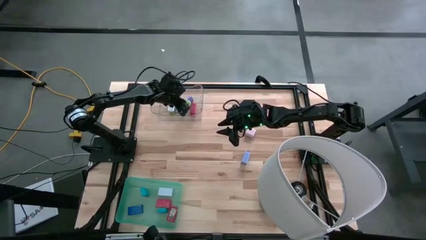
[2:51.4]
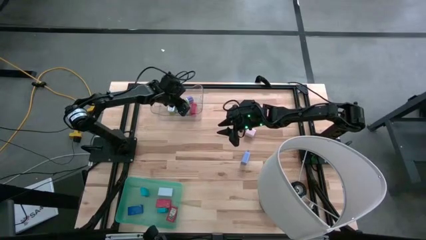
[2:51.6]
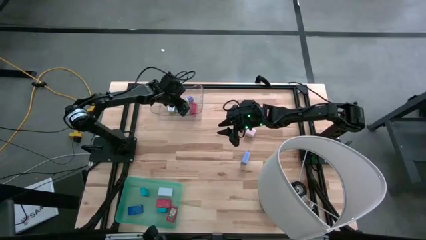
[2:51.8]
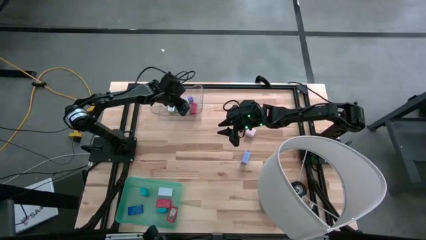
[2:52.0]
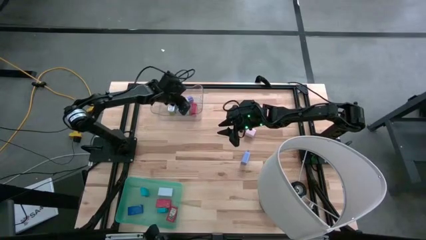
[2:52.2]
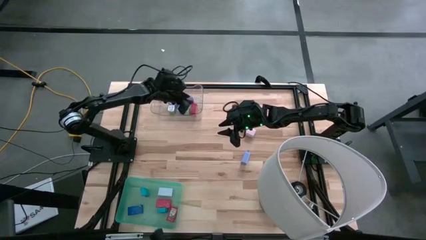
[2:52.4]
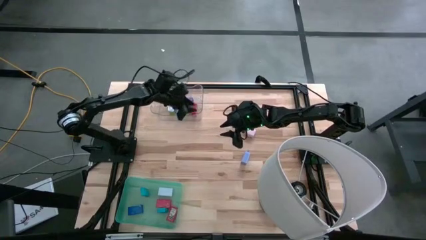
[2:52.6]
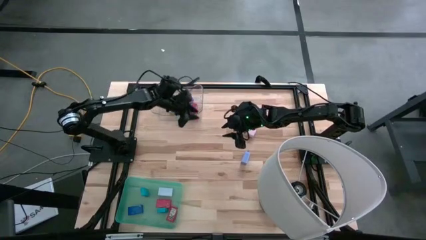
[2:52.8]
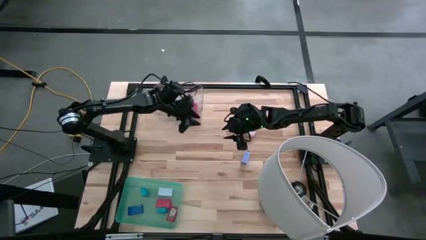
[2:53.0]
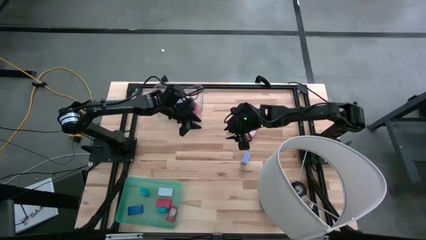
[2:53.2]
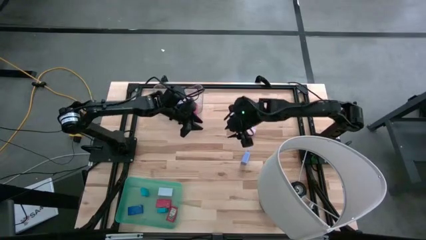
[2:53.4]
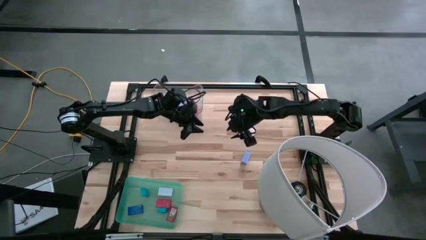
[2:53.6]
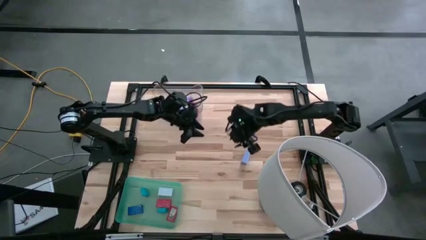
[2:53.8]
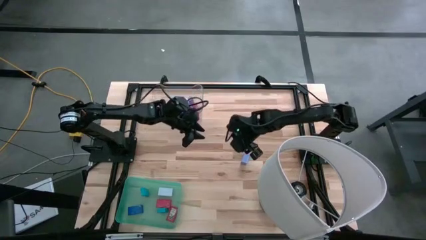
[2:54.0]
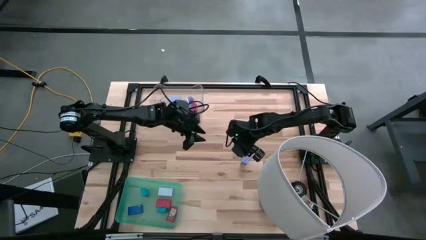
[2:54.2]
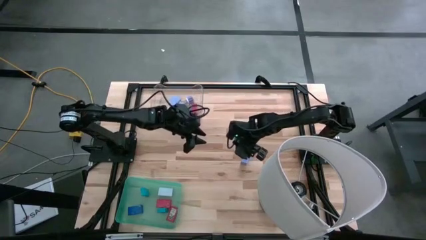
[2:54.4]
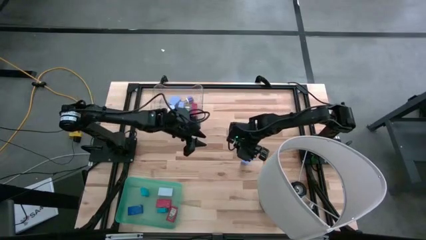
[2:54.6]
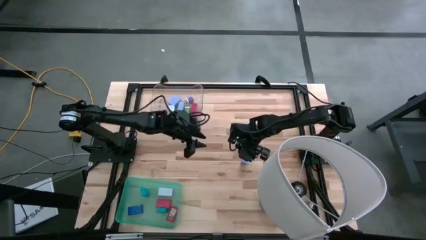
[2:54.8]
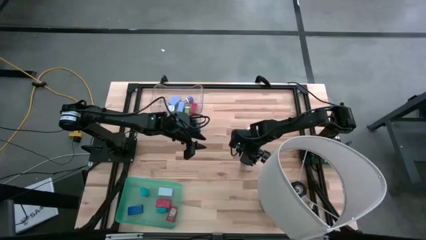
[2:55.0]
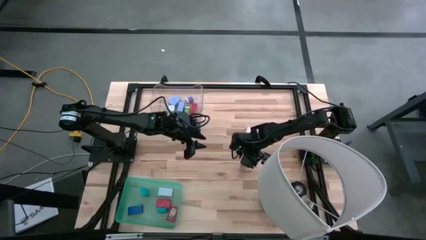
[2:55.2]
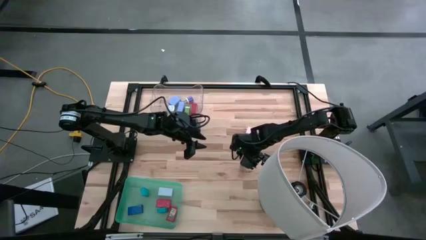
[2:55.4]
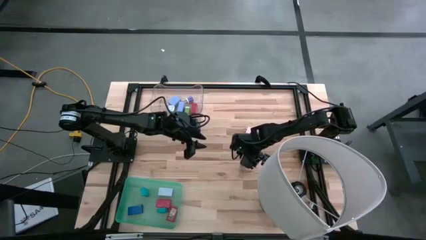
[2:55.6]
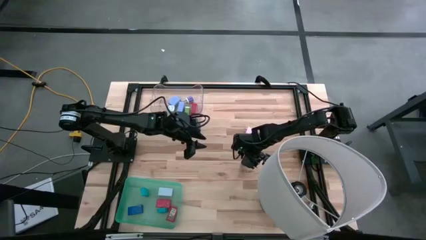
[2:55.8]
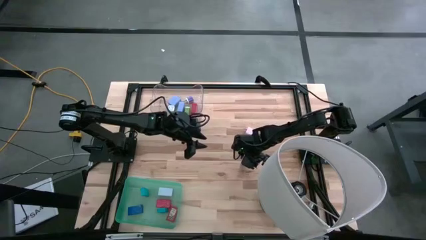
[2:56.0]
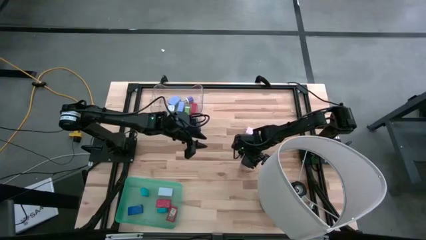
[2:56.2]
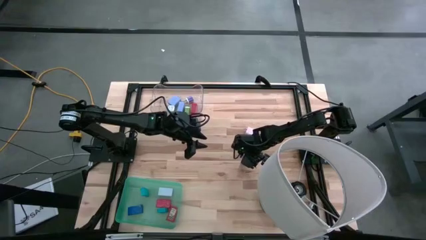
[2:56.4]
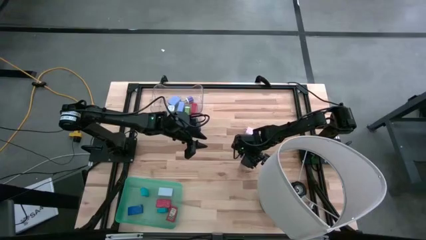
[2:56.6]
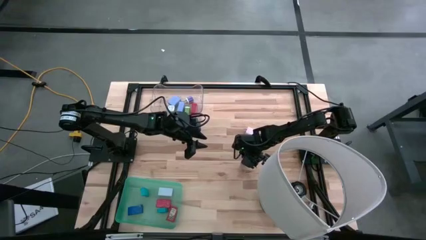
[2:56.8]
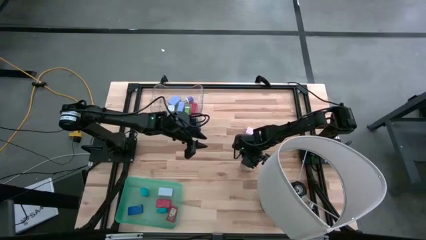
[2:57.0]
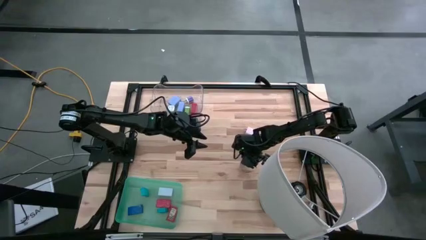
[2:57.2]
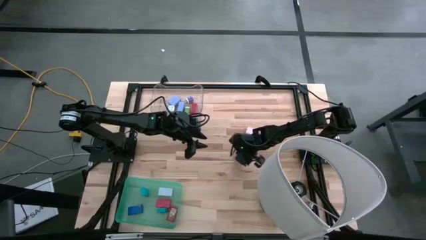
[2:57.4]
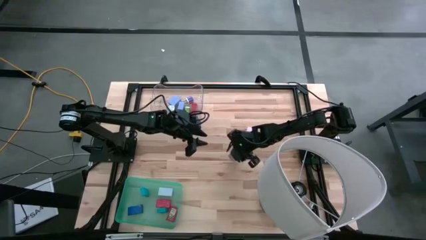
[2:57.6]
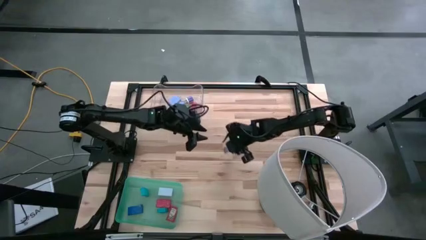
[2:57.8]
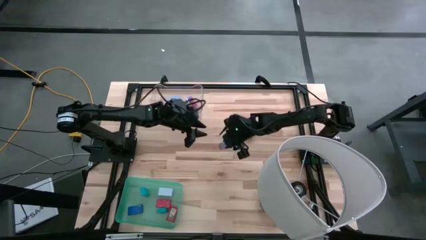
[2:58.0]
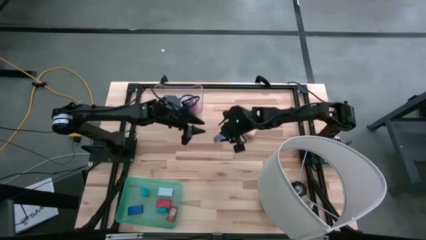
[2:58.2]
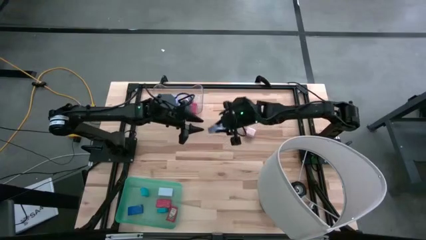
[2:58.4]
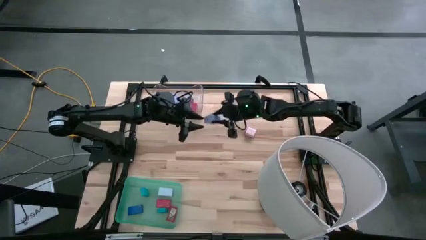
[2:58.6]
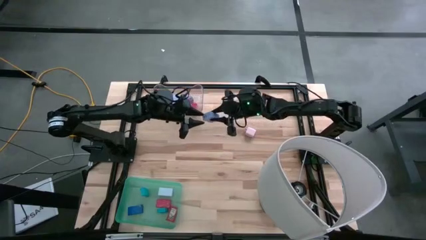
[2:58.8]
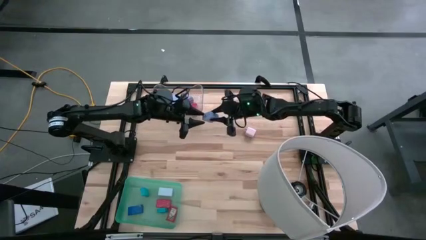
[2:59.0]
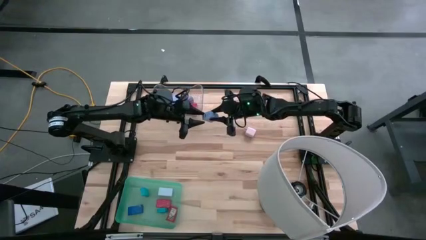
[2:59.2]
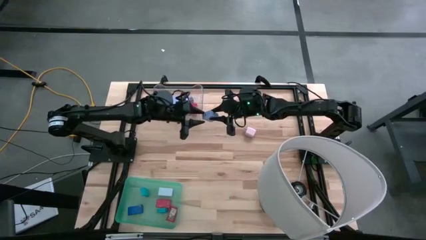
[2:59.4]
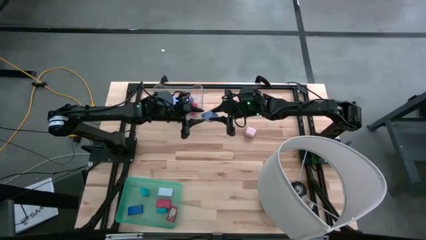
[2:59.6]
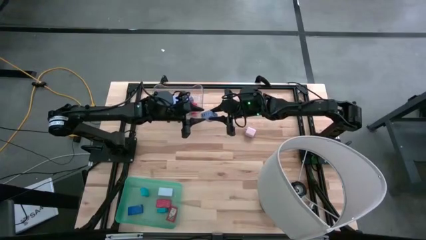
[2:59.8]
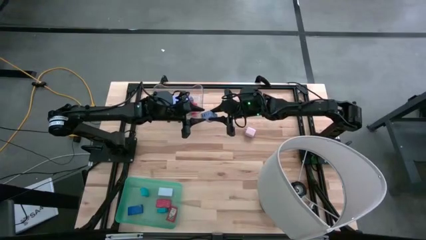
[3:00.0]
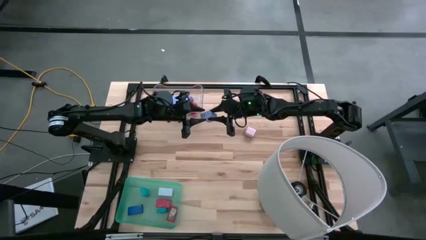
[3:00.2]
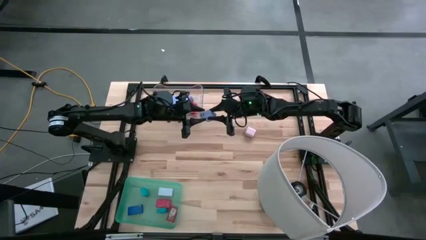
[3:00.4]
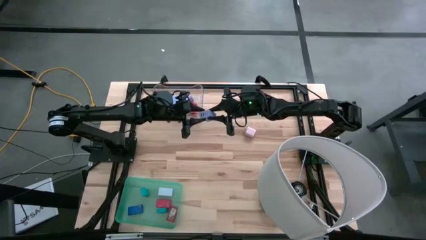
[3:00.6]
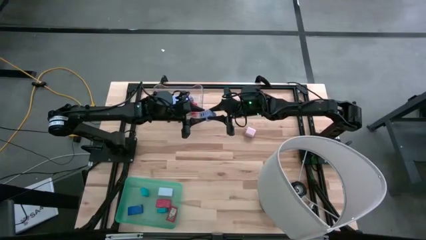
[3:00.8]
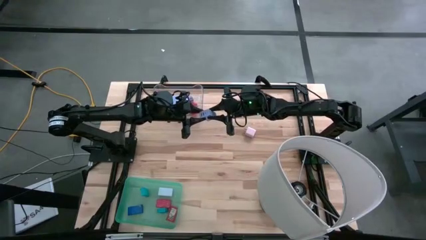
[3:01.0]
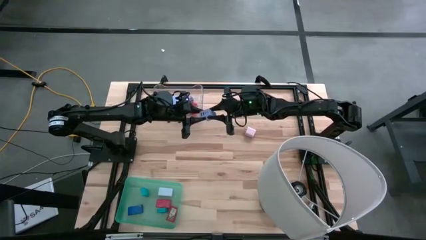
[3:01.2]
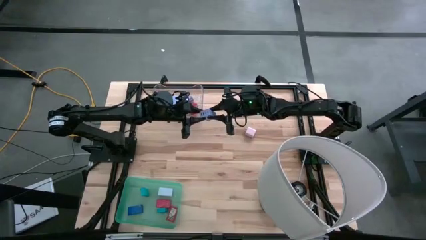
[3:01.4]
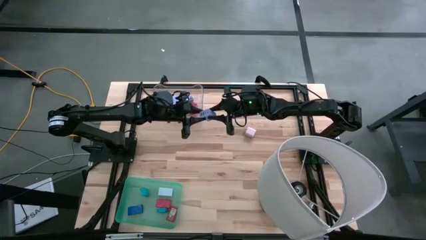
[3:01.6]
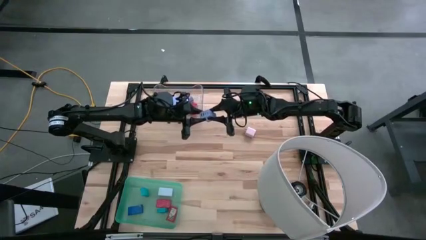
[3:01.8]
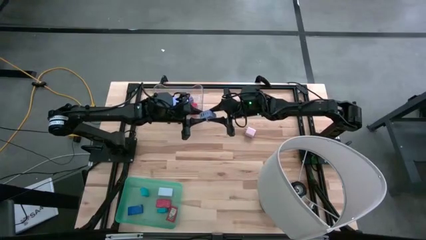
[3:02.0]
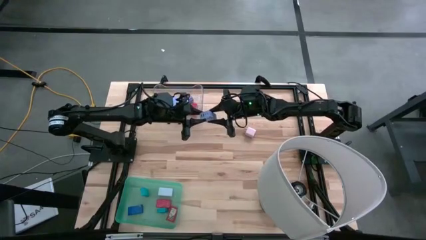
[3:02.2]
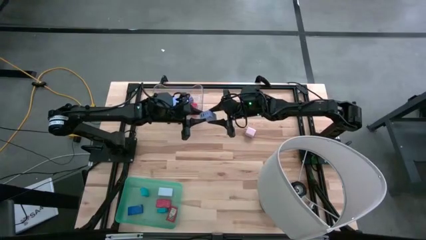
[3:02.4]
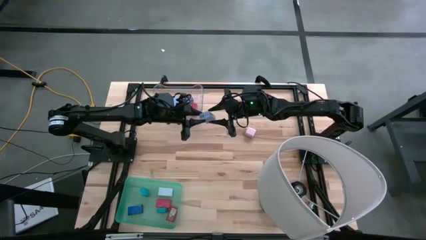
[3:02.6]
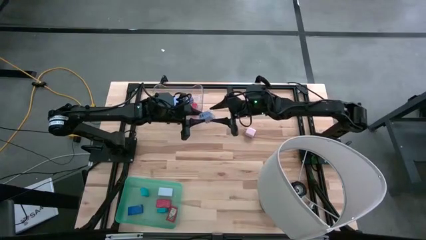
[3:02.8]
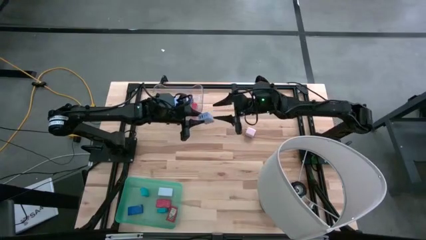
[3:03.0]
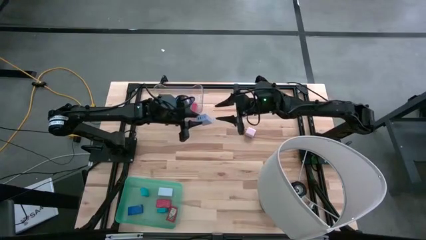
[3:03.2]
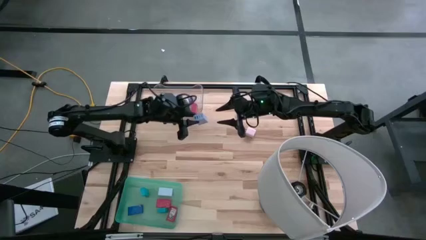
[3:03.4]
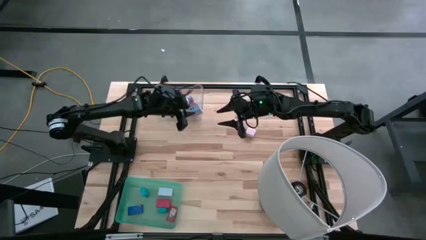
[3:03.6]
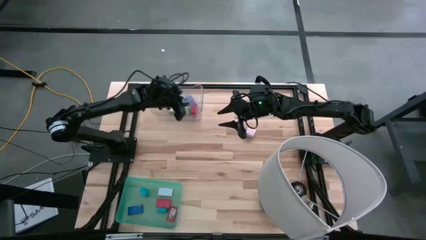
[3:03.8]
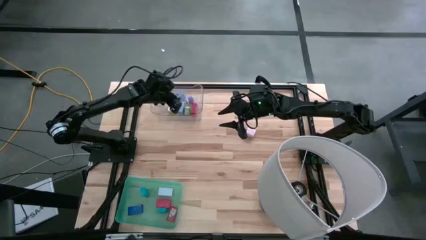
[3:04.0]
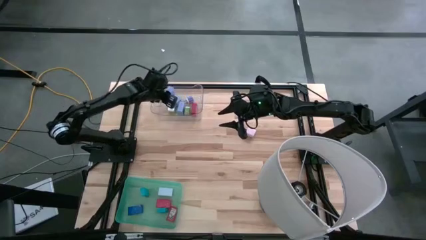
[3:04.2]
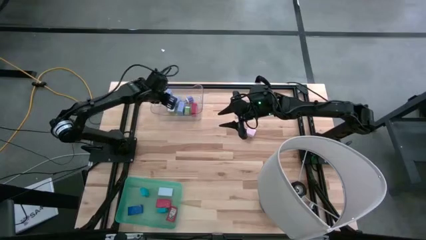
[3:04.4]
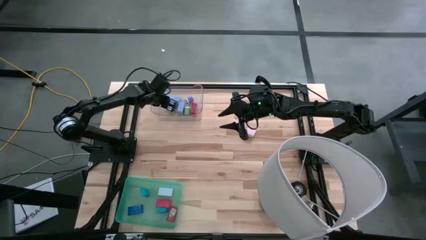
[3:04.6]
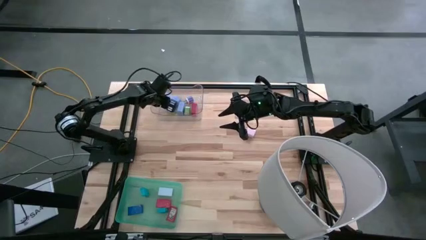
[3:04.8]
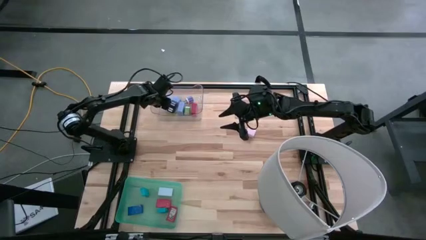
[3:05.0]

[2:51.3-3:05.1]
Task: Pick & Place Office items
Put the blue charger adapter into the transparent bin
